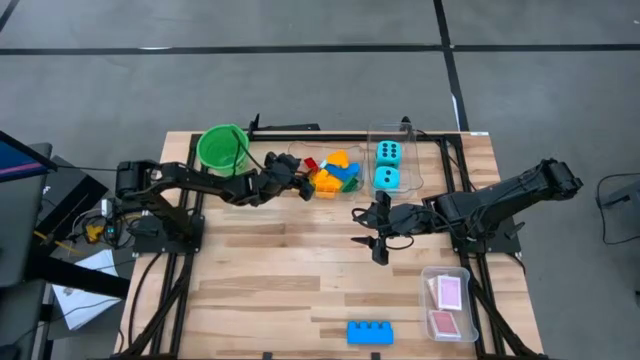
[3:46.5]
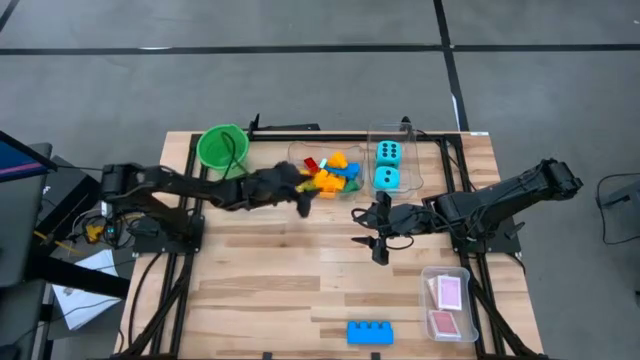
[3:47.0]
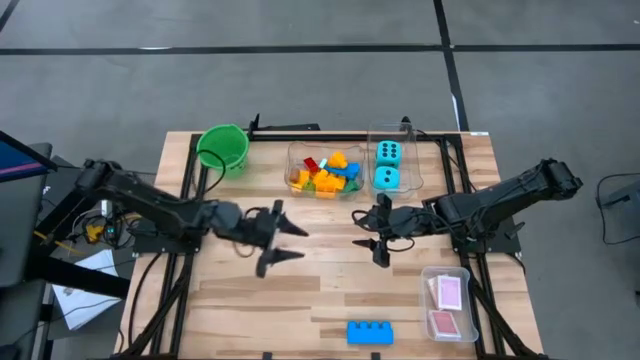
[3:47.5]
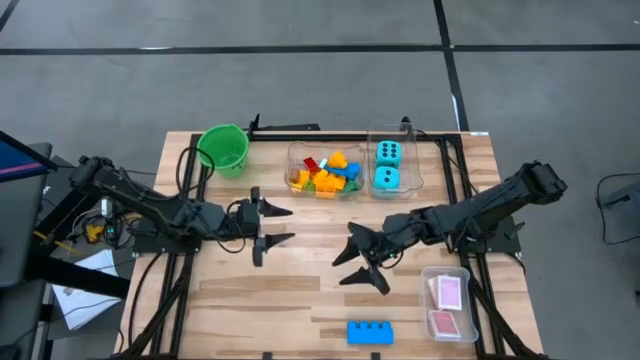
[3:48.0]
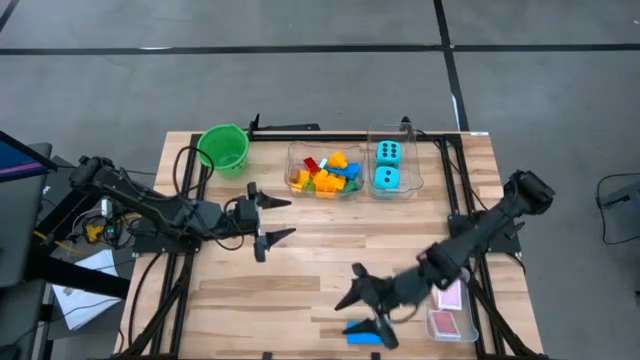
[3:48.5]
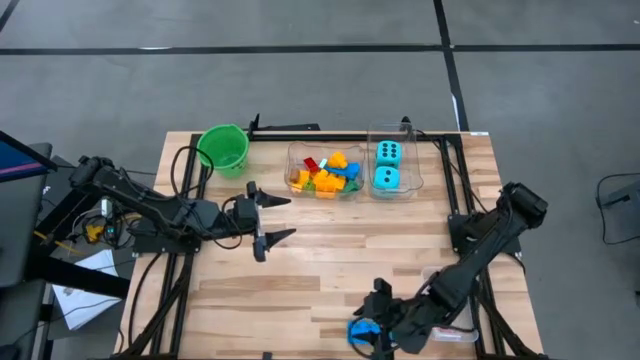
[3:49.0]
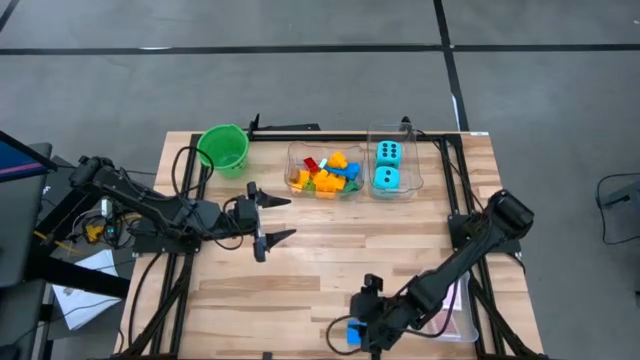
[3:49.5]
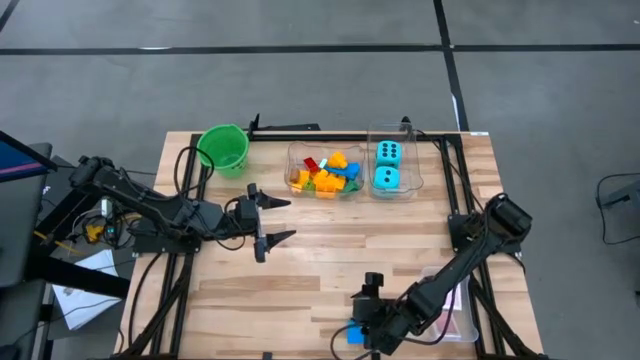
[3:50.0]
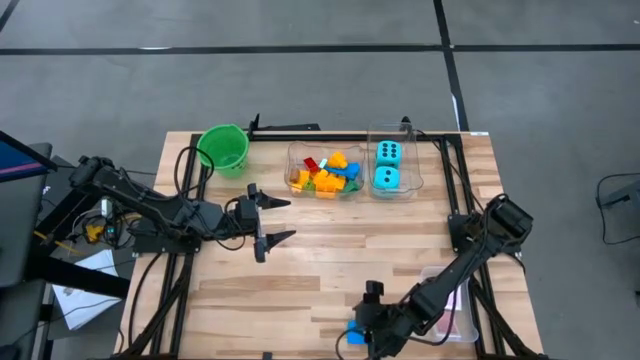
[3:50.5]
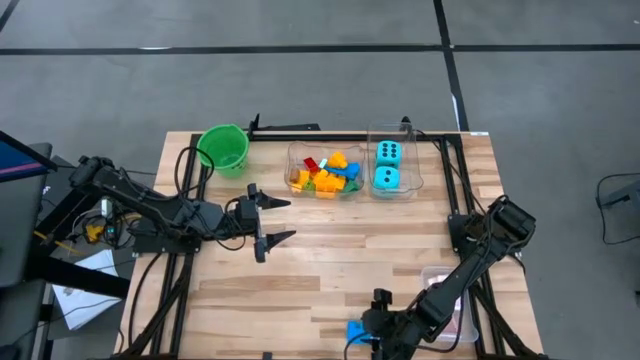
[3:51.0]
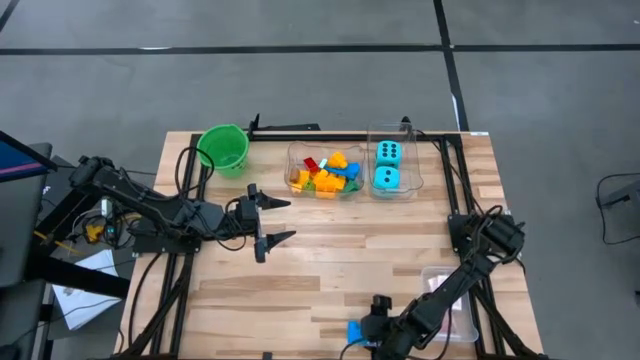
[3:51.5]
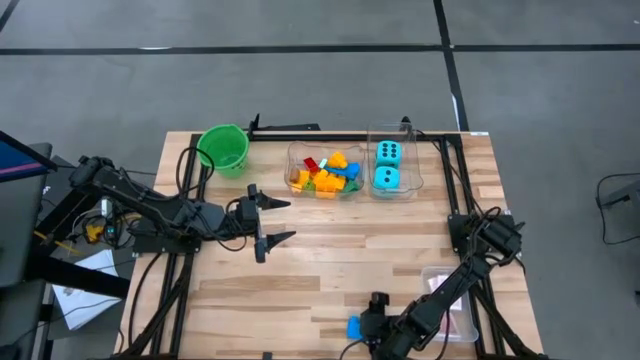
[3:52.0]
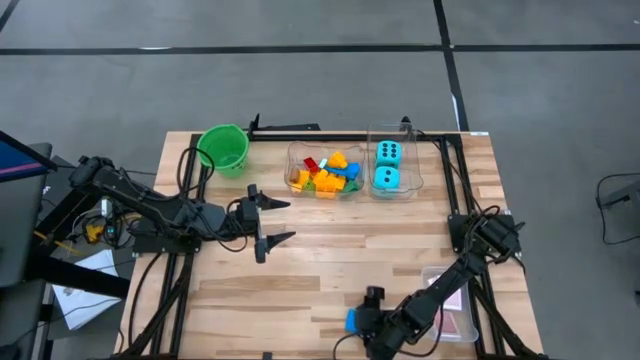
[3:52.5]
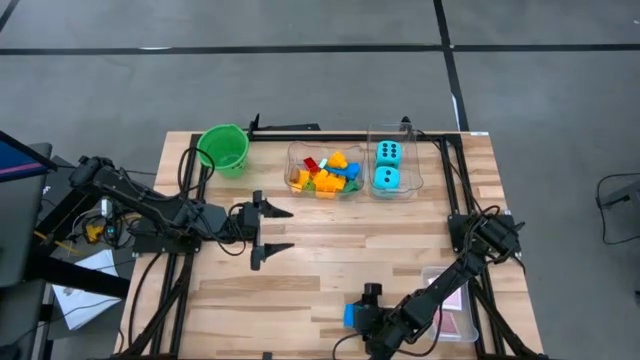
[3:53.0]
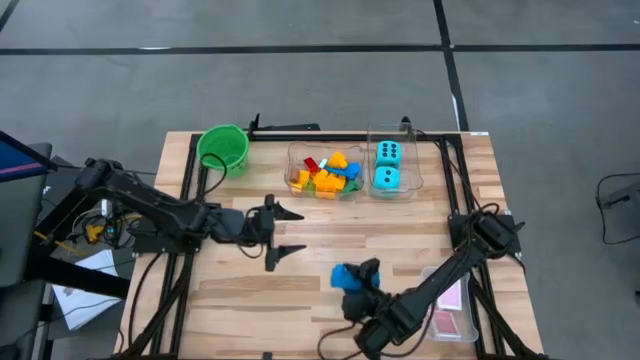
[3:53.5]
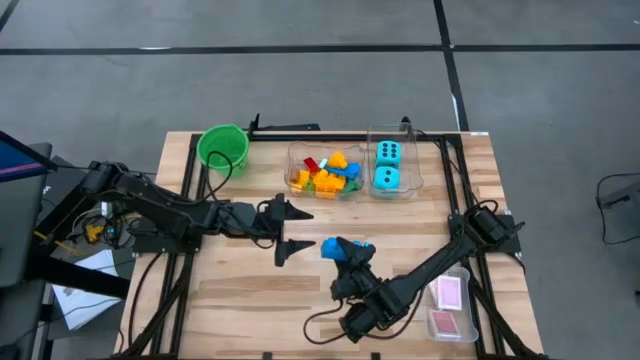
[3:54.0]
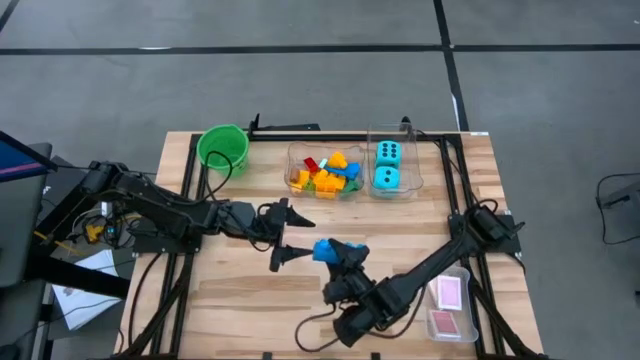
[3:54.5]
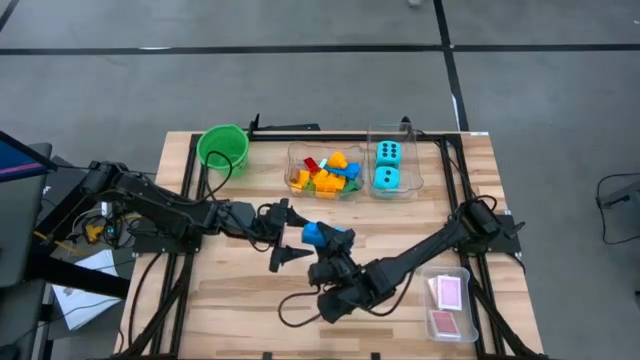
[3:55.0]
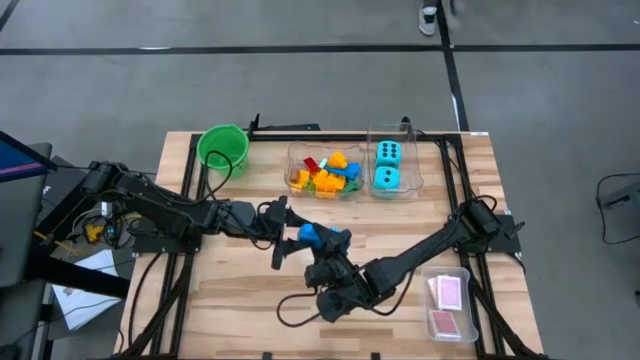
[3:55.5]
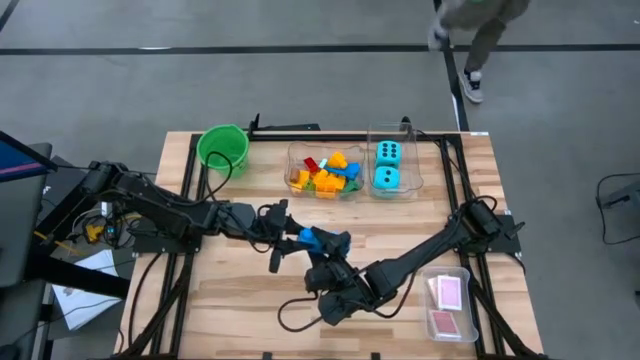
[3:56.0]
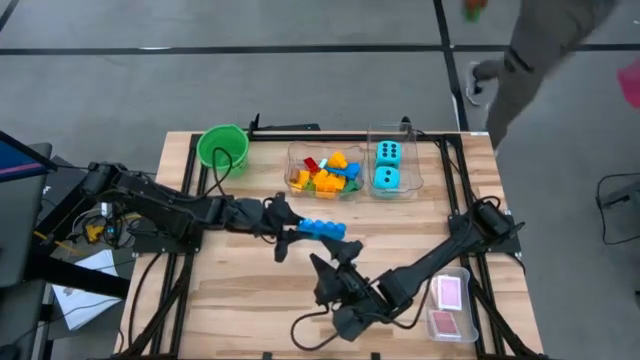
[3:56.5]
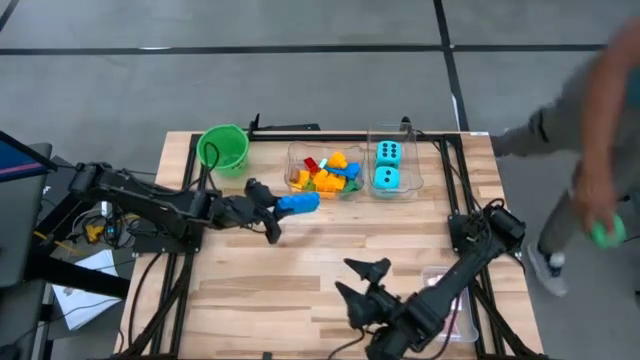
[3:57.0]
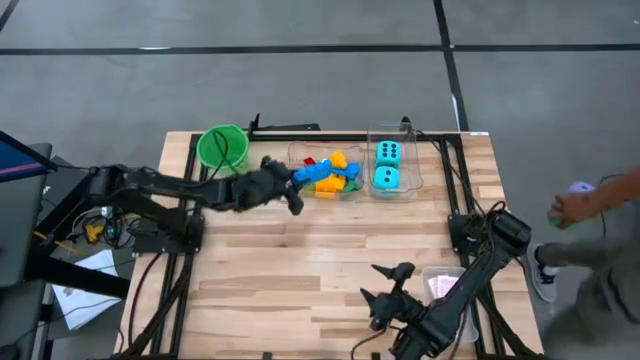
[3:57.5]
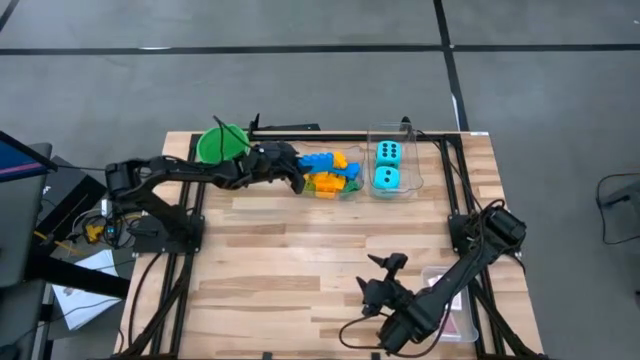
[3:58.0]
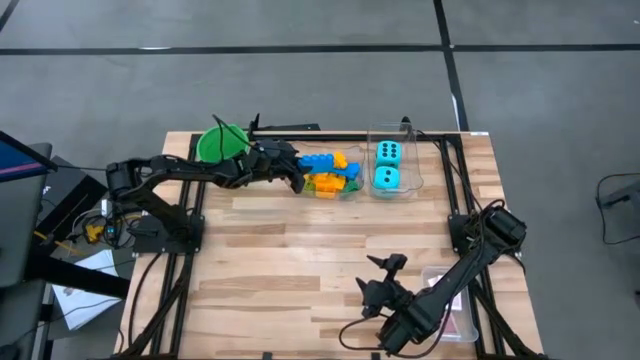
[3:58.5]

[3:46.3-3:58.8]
Task: Pick & Place Toys
Put the blue gamepiece into the left transparent bin

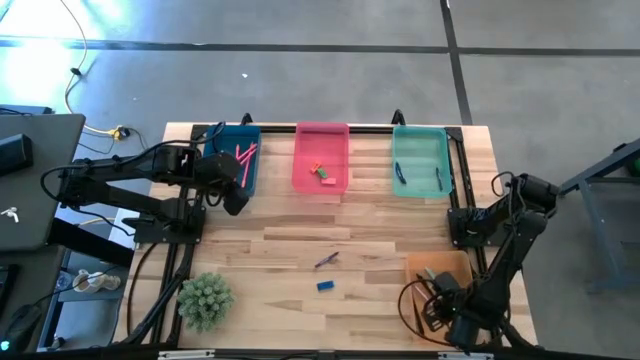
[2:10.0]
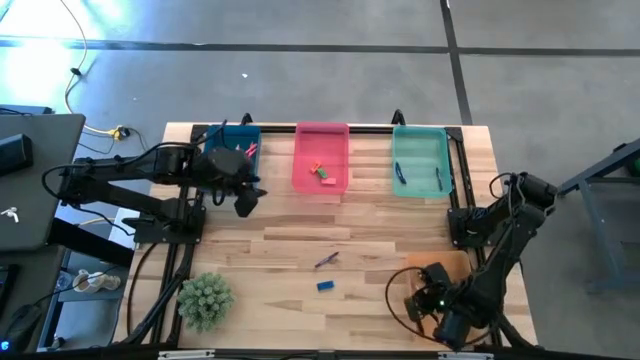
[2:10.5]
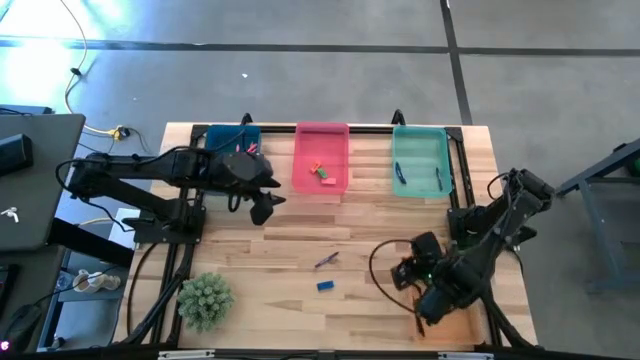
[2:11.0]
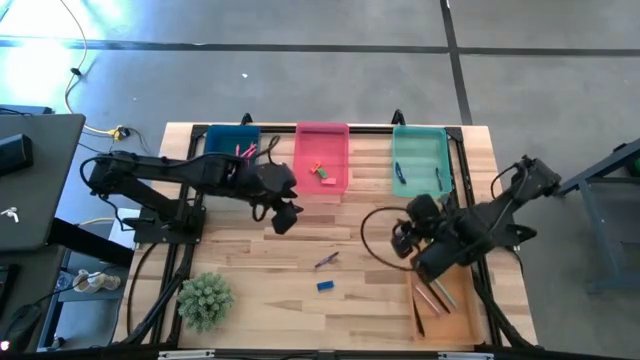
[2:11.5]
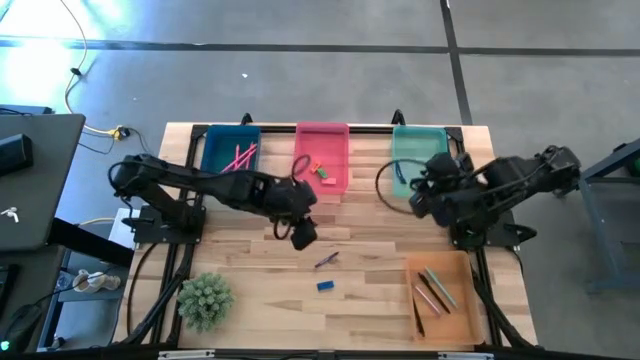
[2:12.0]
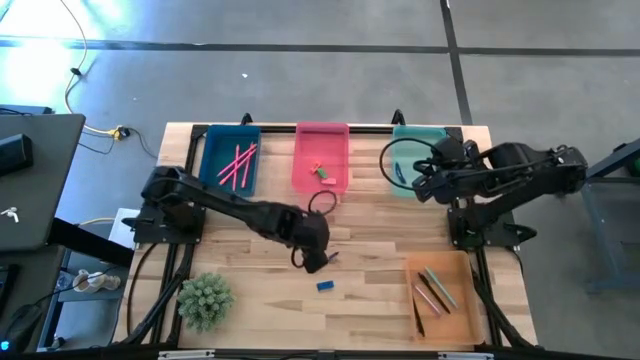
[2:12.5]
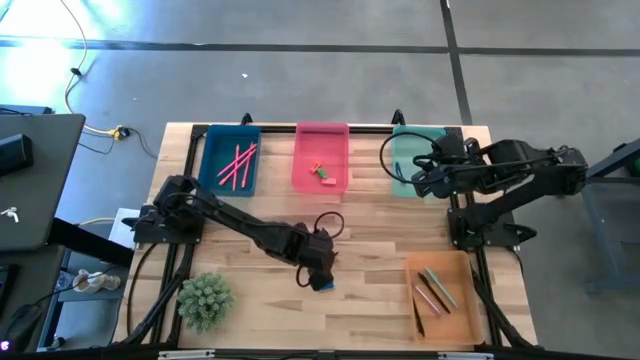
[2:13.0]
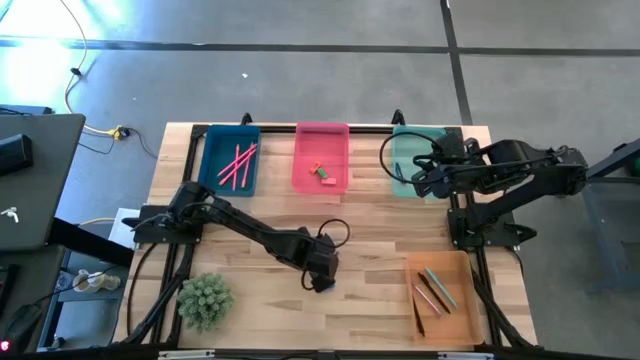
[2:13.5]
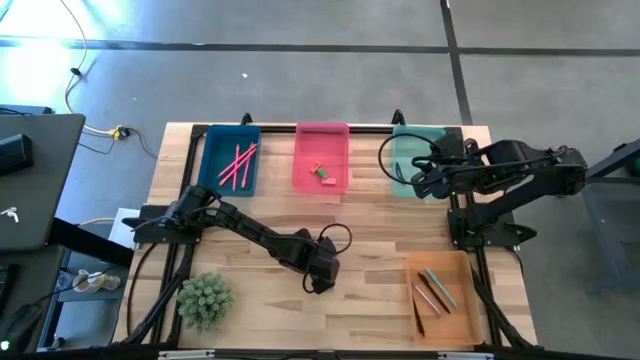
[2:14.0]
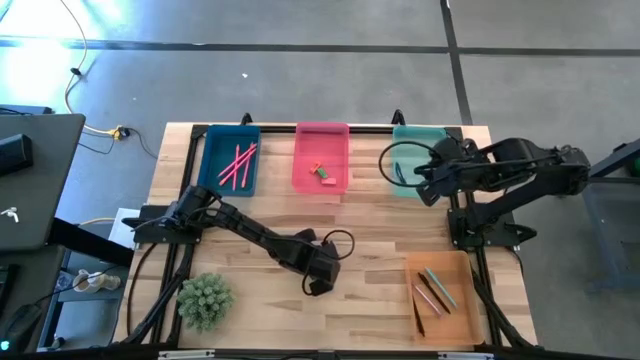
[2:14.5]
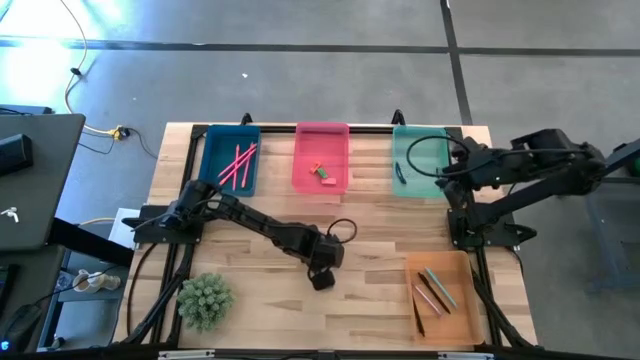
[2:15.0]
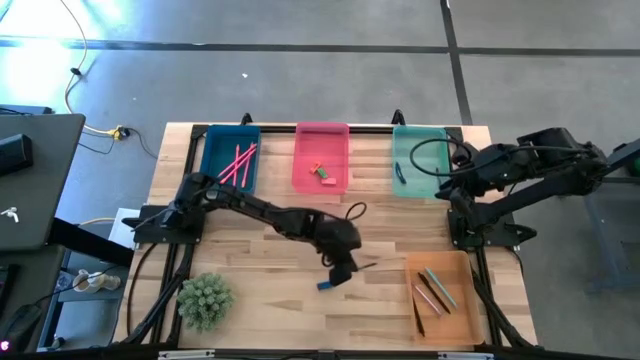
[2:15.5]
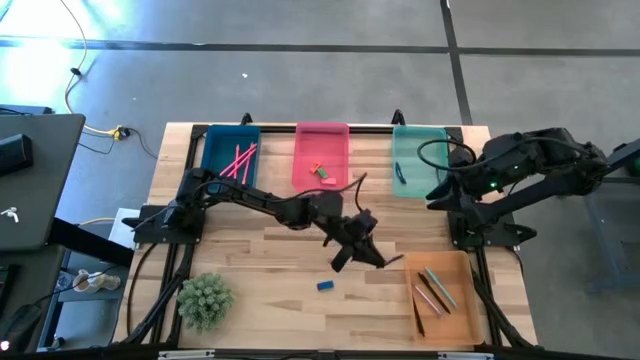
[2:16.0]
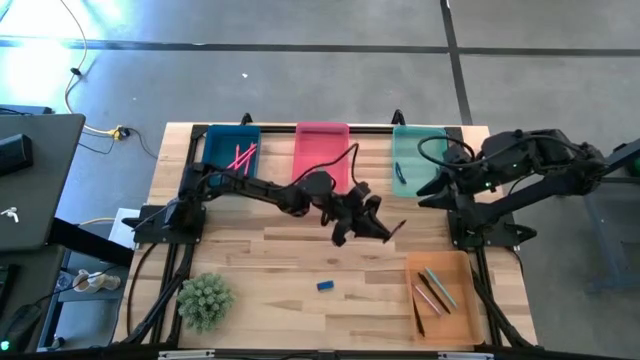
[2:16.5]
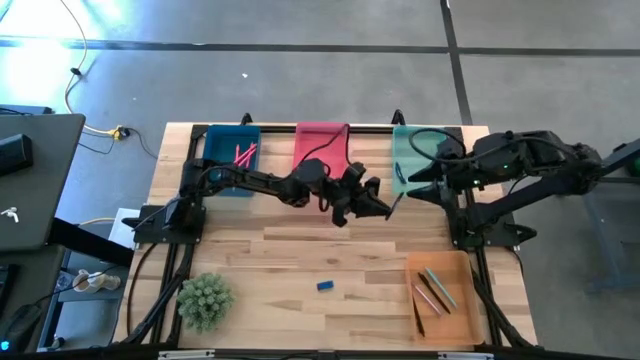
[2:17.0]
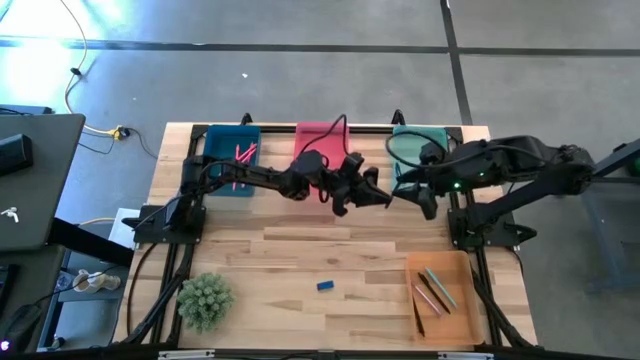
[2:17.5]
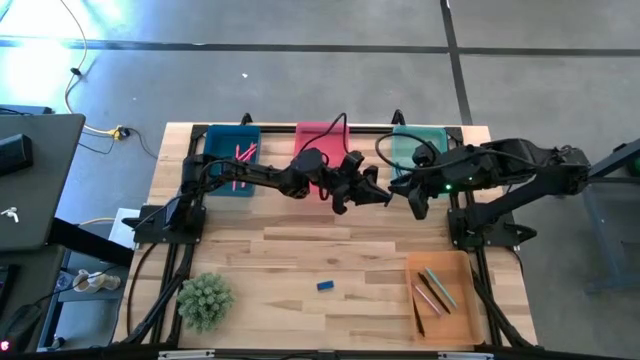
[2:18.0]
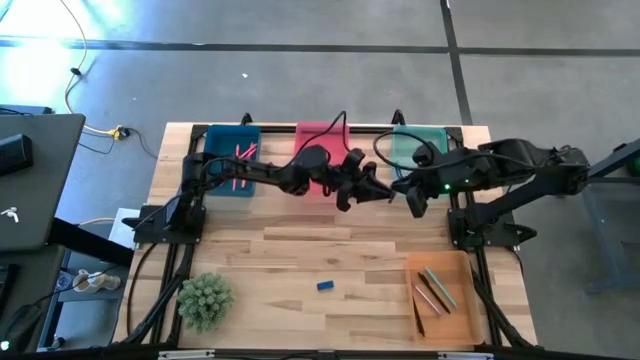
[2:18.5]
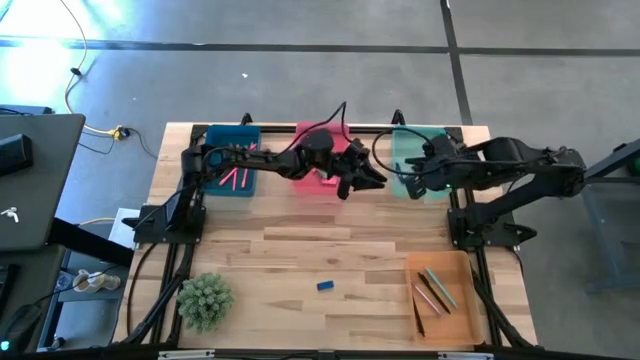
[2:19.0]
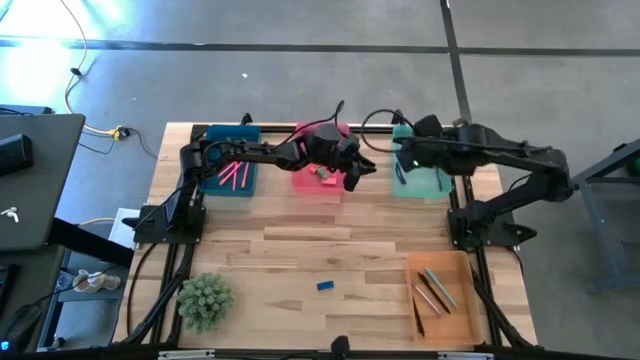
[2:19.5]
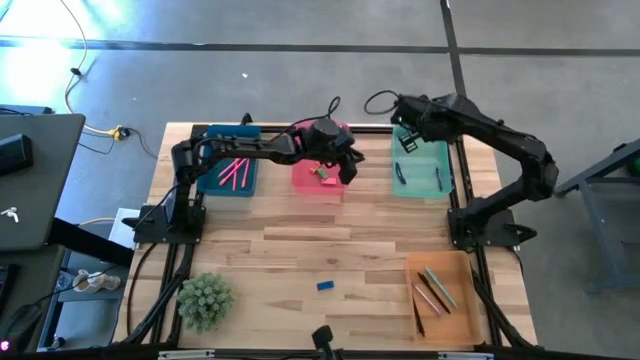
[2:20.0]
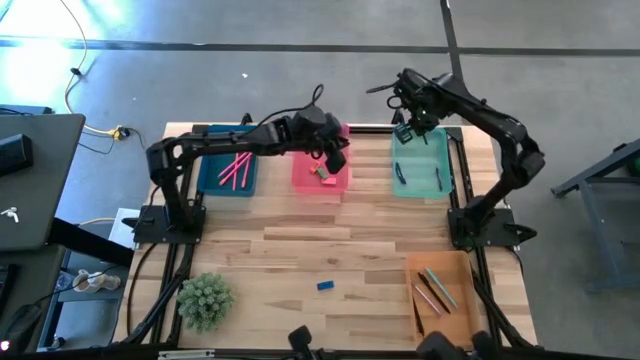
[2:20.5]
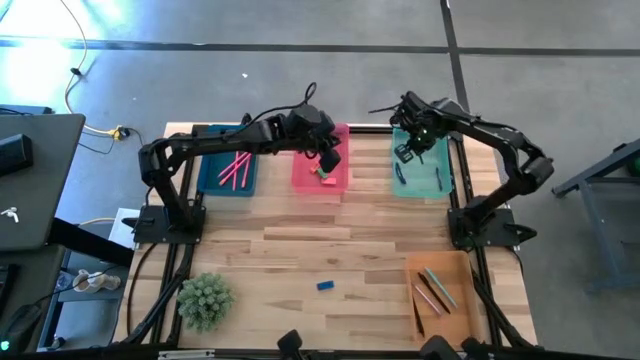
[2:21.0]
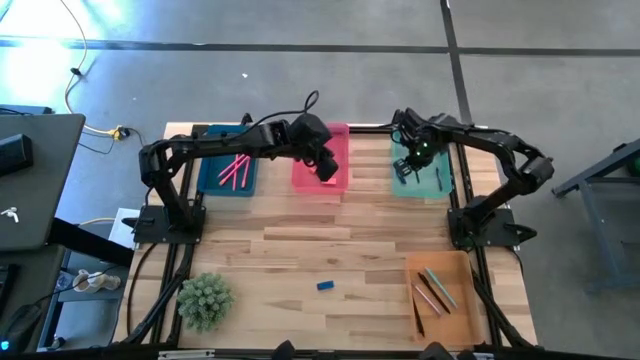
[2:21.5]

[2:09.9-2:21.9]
Task: Sort crayons/erasers/pens/pencils in bins
Put the blue crayon into the green bin
